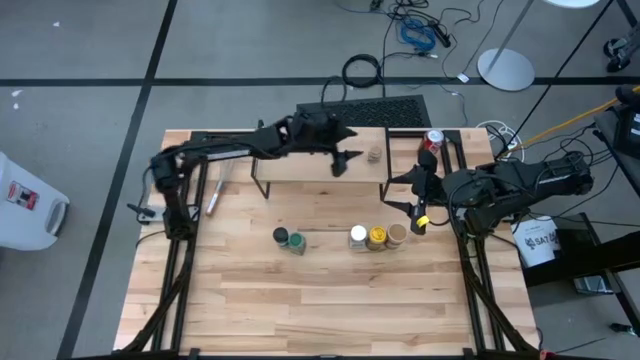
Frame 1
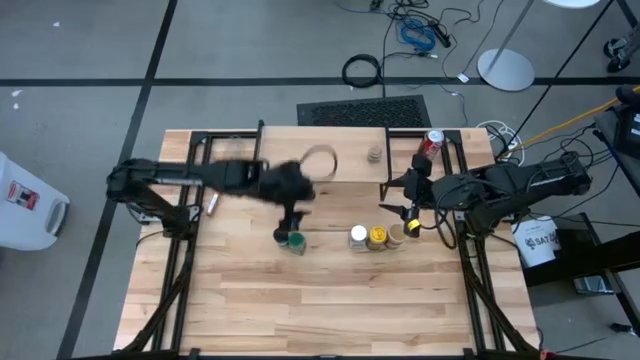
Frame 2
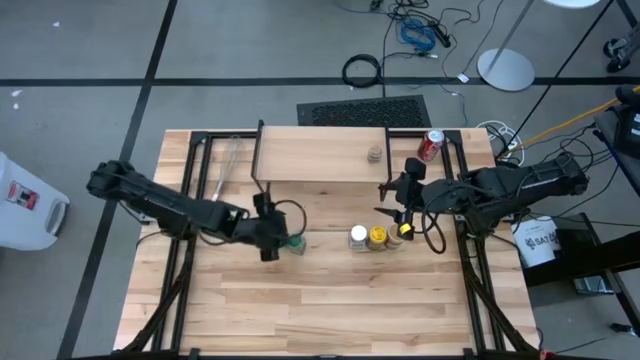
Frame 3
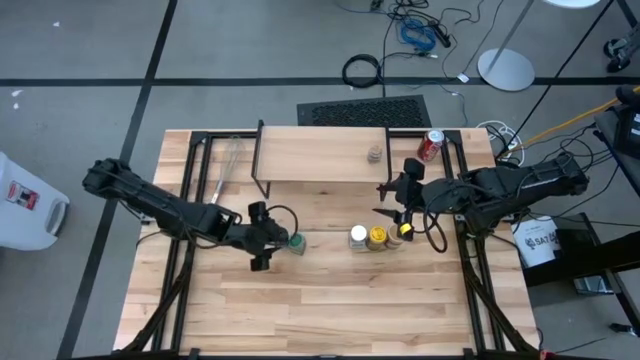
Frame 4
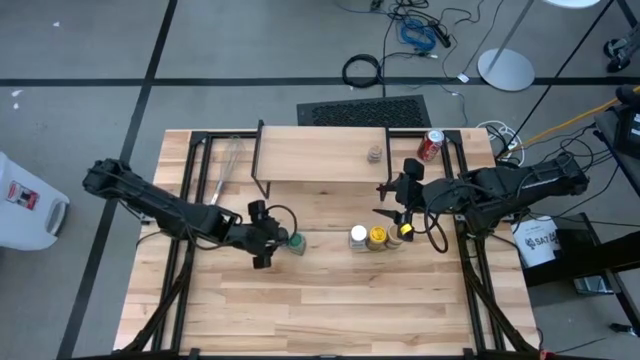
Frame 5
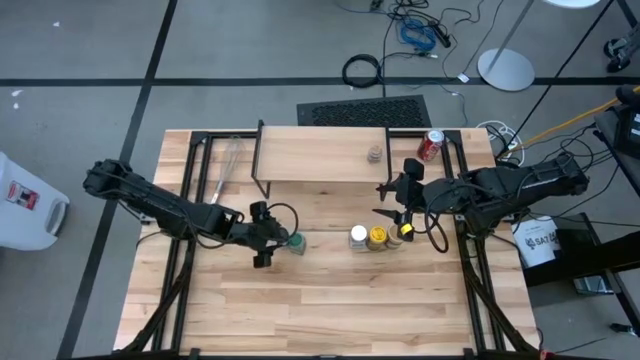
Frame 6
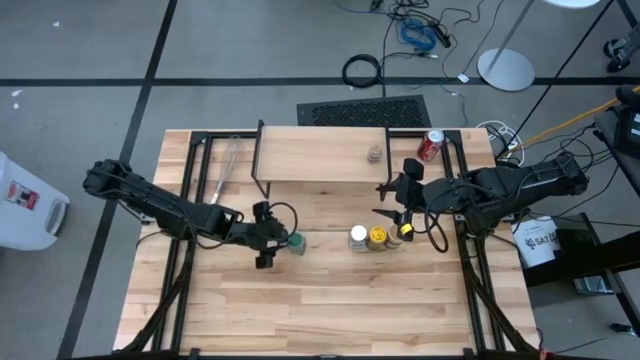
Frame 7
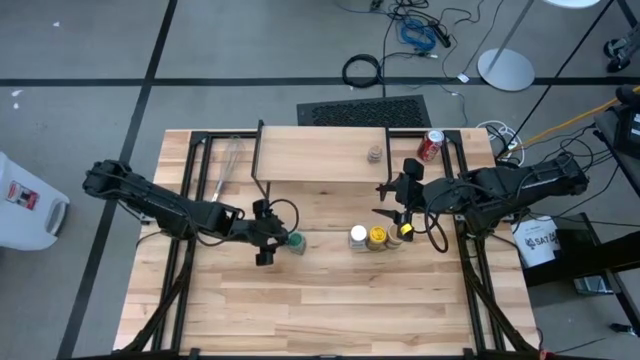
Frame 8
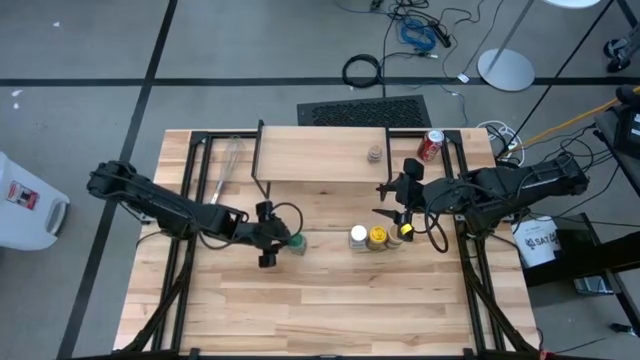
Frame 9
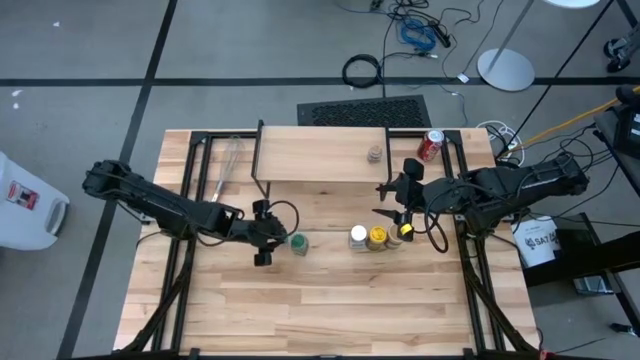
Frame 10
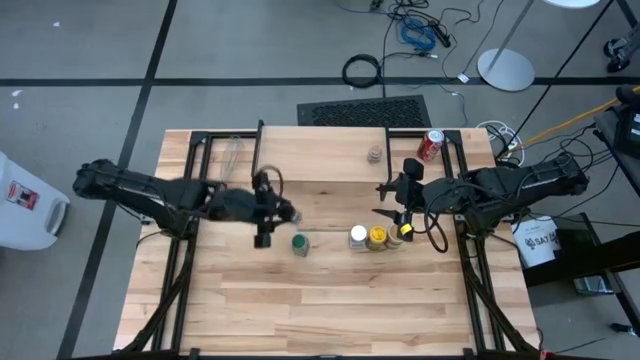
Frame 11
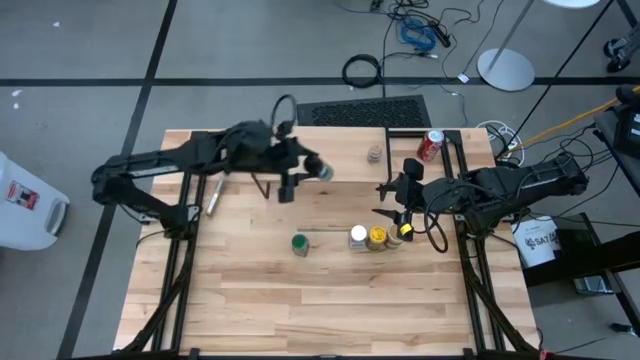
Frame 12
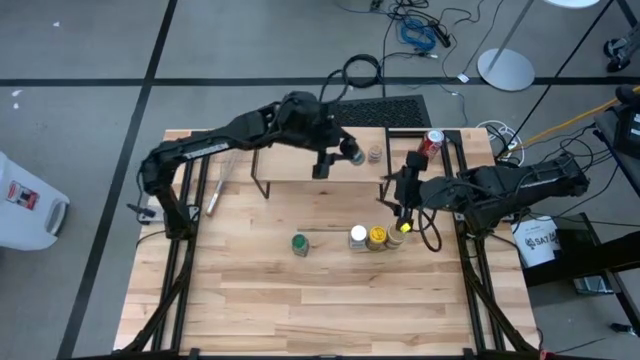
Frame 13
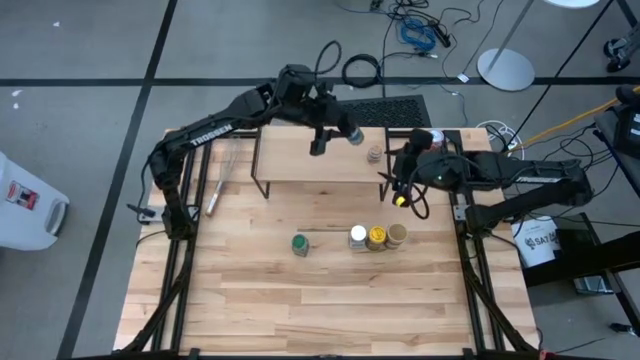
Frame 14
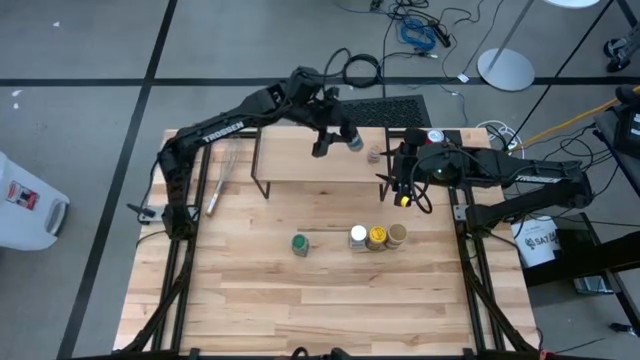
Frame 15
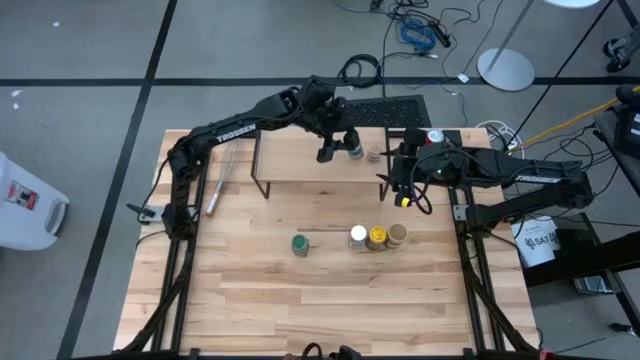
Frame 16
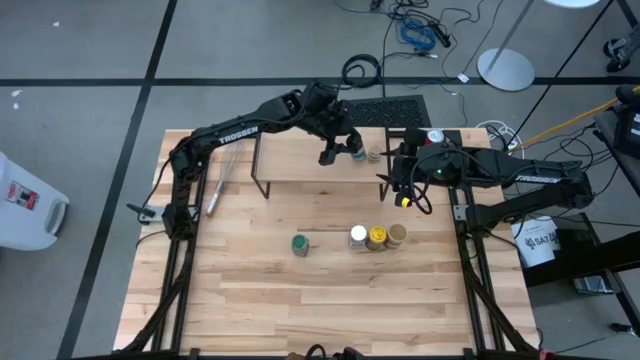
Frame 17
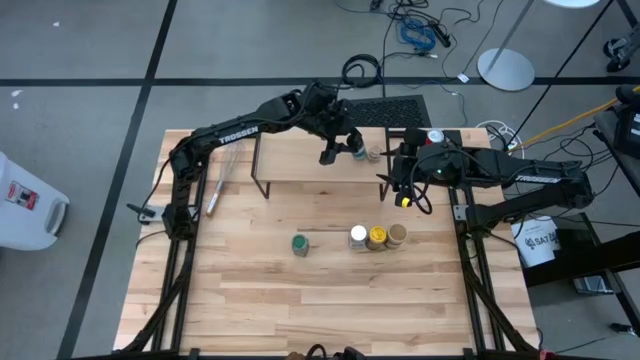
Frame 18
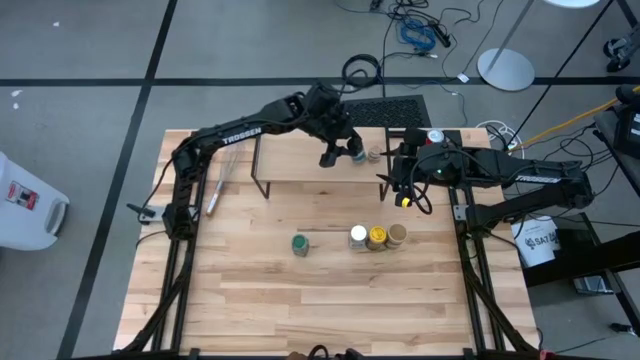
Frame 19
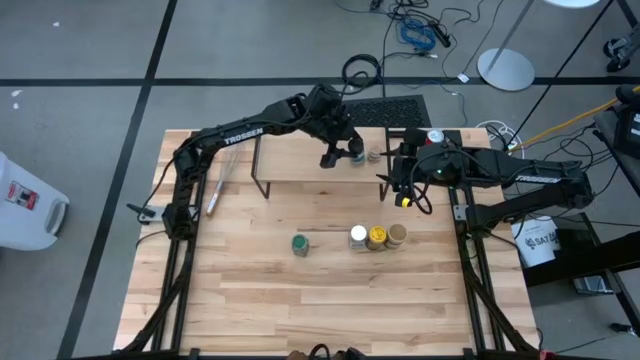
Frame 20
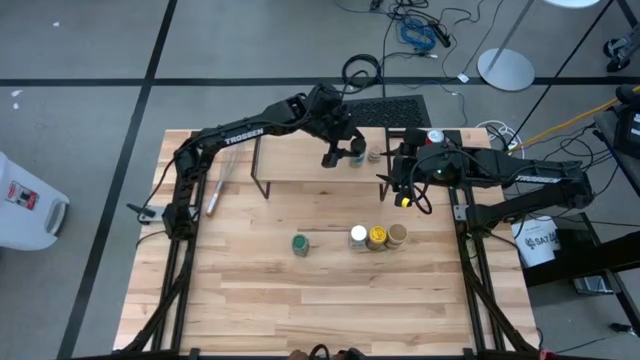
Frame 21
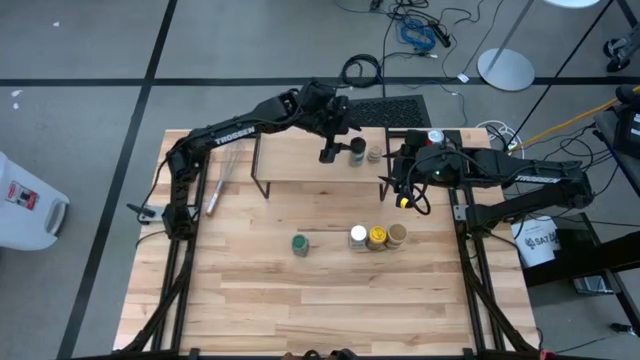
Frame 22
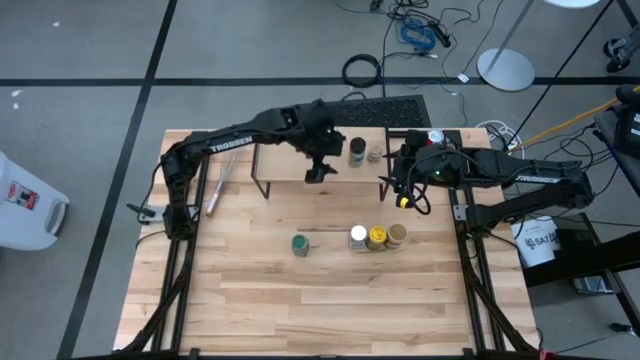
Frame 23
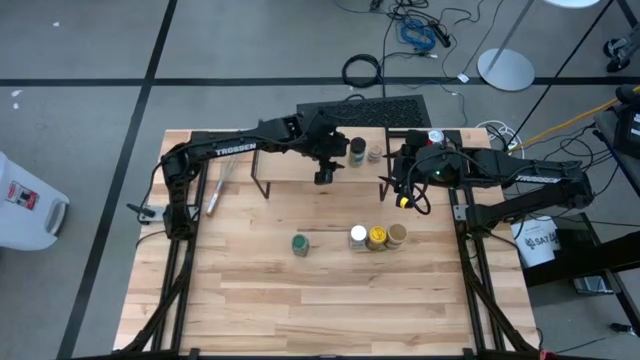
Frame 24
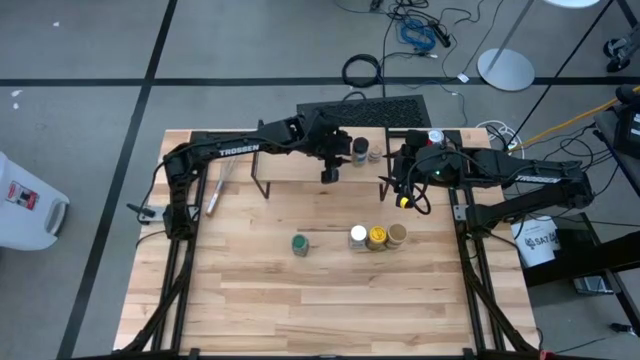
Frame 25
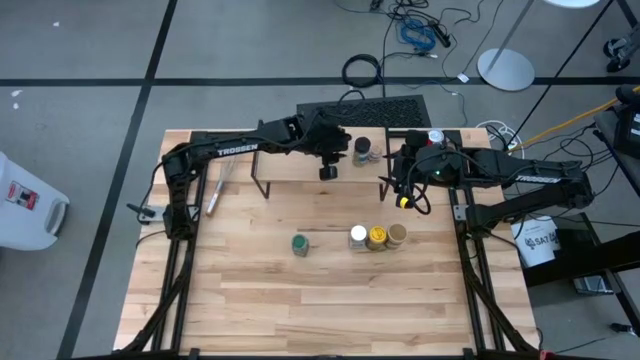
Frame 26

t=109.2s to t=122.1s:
Task: Shelf spices
Put the black seasoning bottle on the shelf

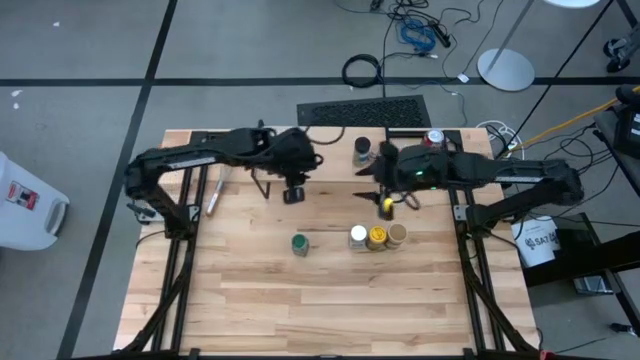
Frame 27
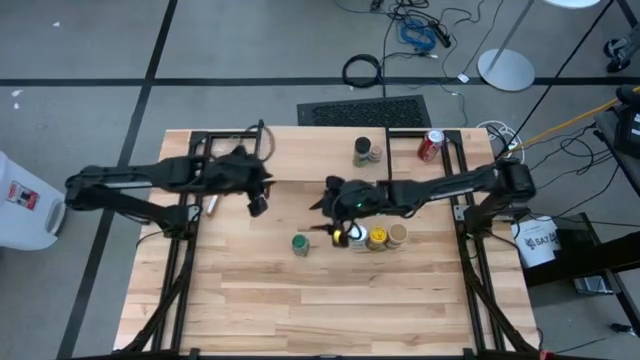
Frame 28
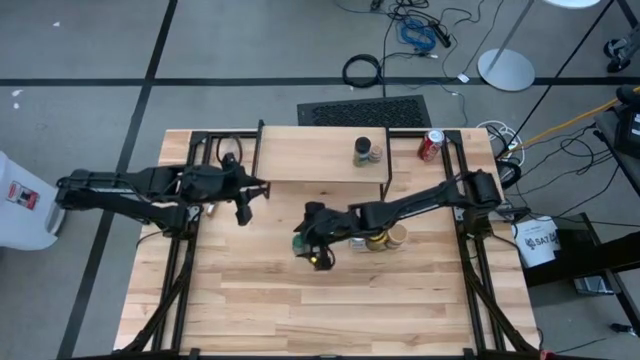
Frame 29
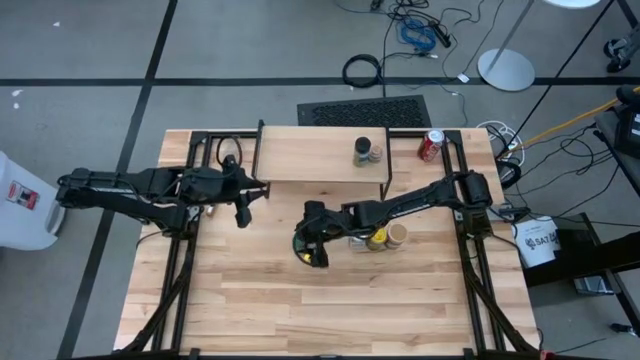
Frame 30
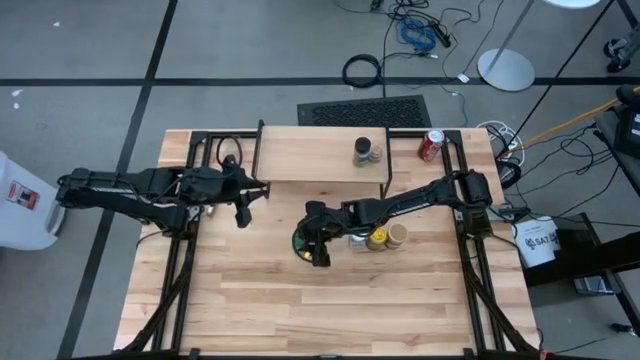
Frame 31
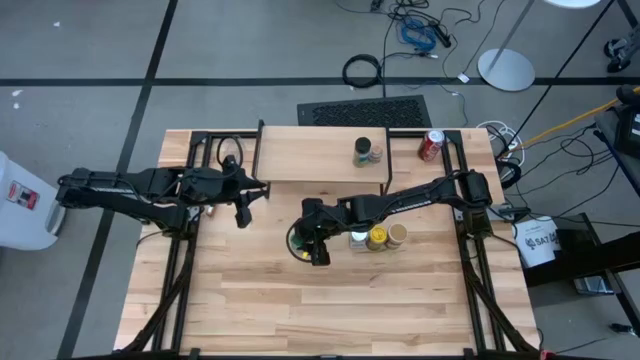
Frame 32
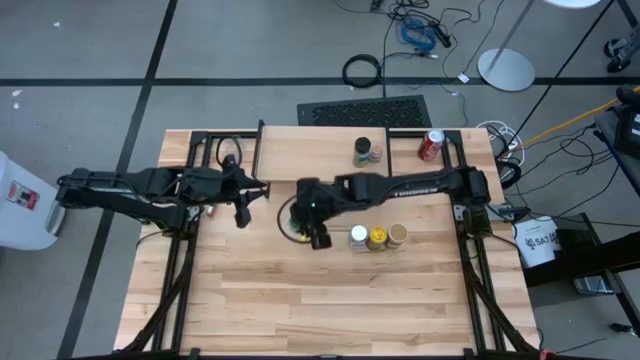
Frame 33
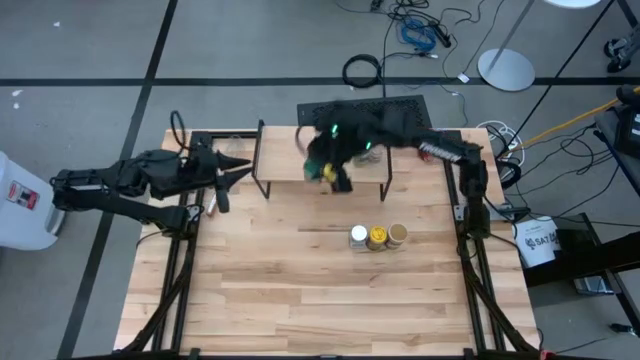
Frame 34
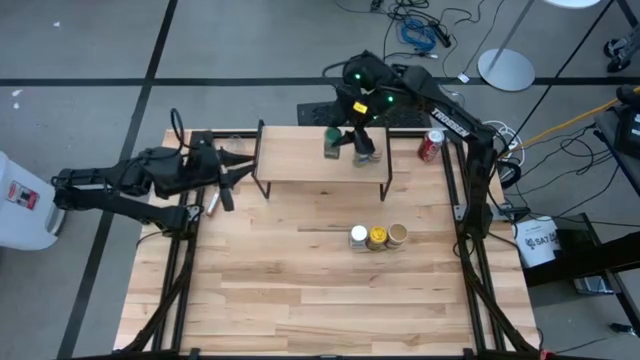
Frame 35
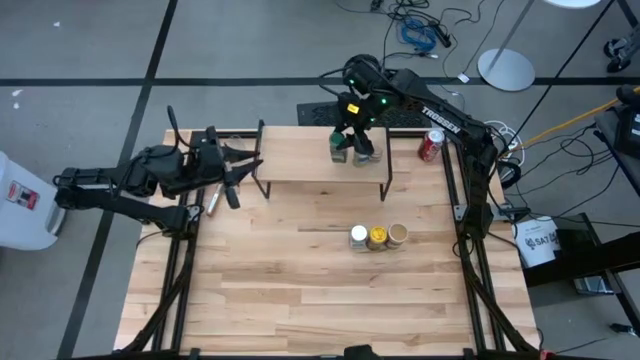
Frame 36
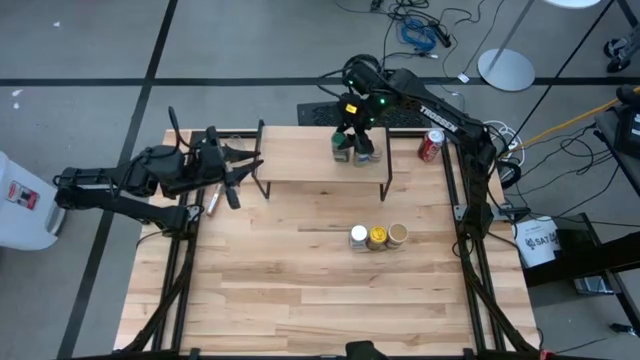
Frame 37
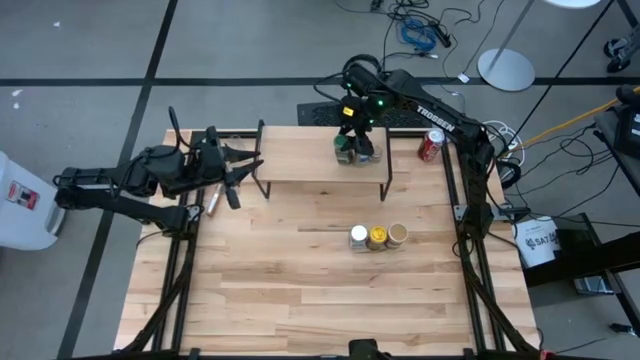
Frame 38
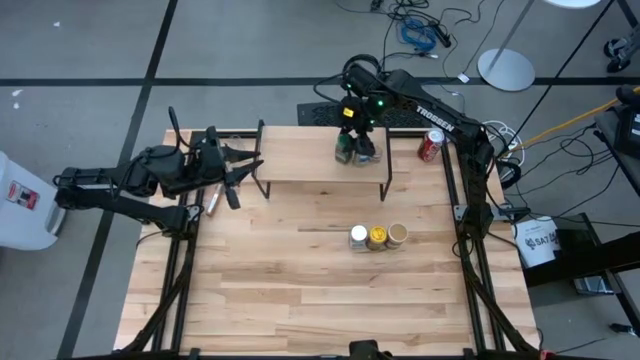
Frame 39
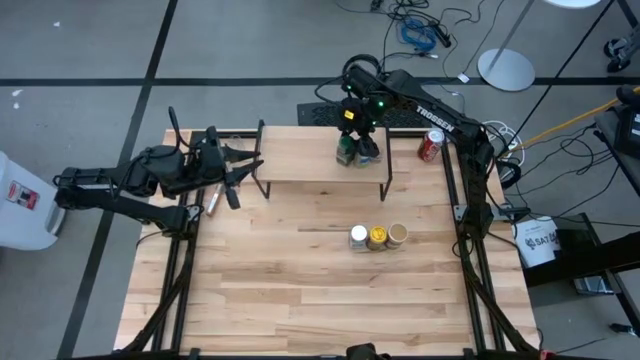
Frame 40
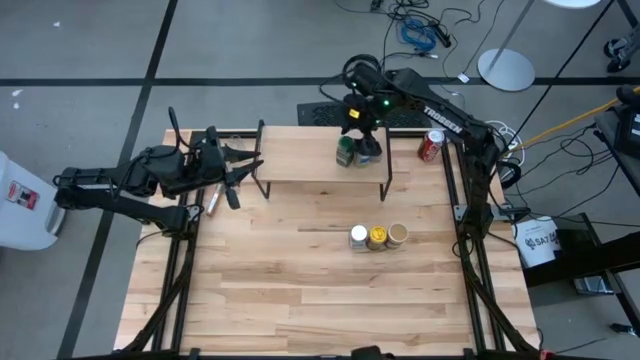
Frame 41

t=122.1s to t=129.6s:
Put the green seasoning bottle on the shelf

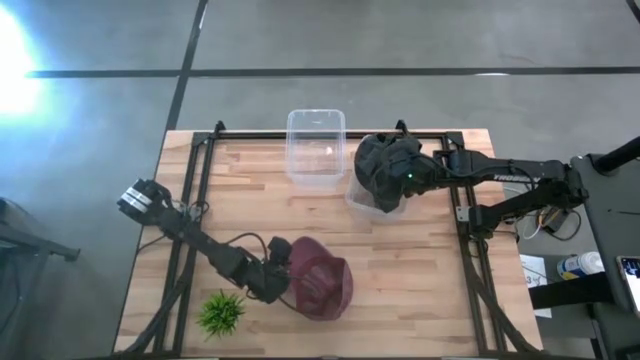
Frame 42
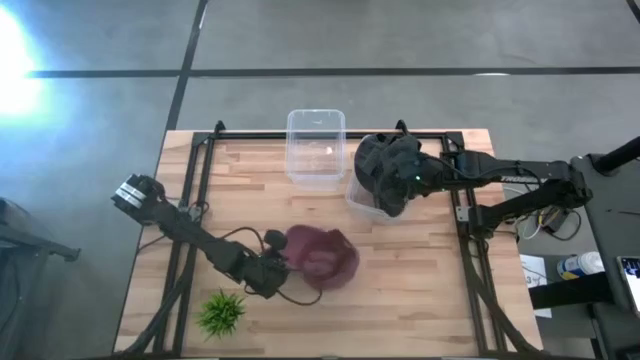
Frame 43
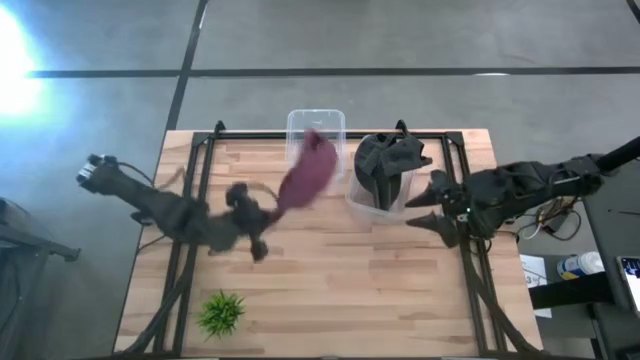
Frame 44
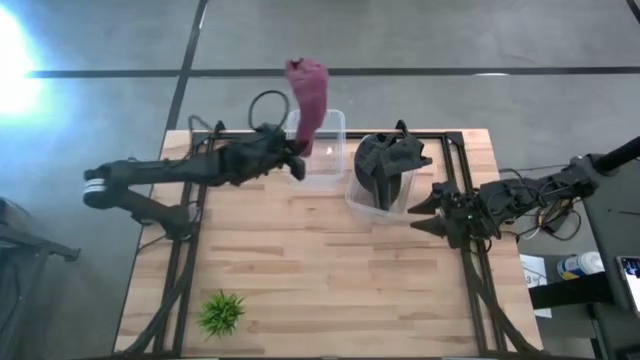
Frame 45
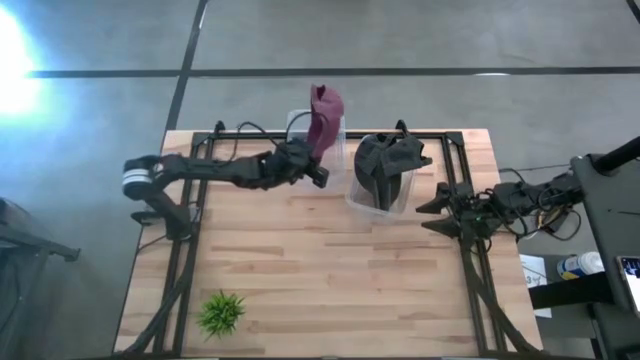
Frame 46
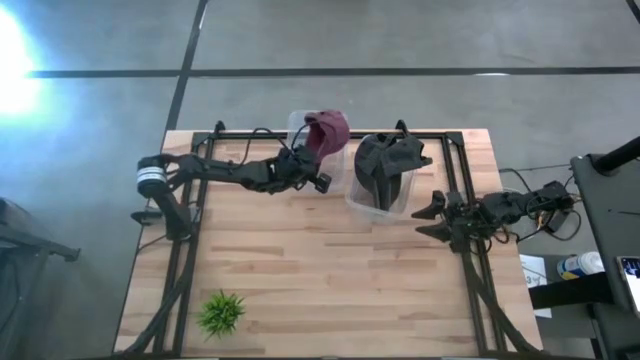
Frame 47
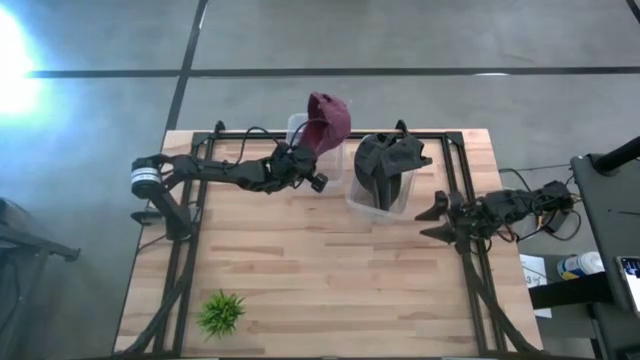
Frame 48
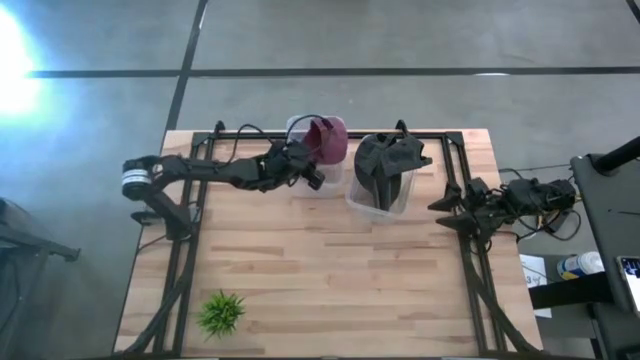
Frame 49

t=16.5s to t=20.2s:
Task: Pick & Place hat
Put the red cap into the left transparent bin
